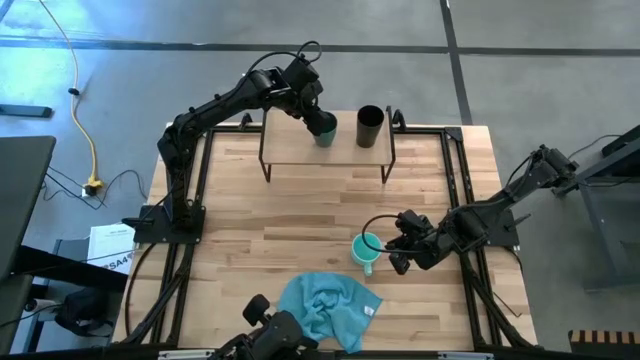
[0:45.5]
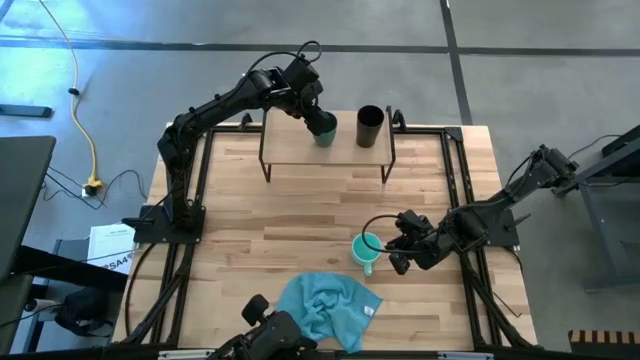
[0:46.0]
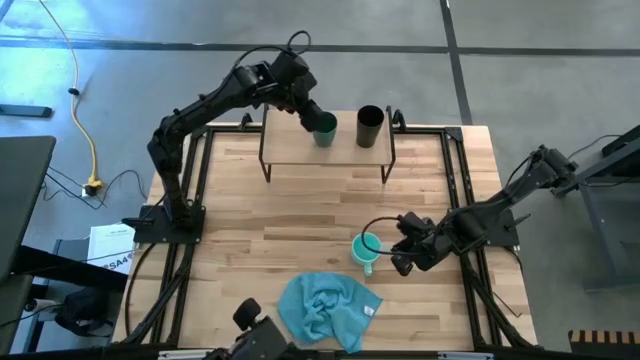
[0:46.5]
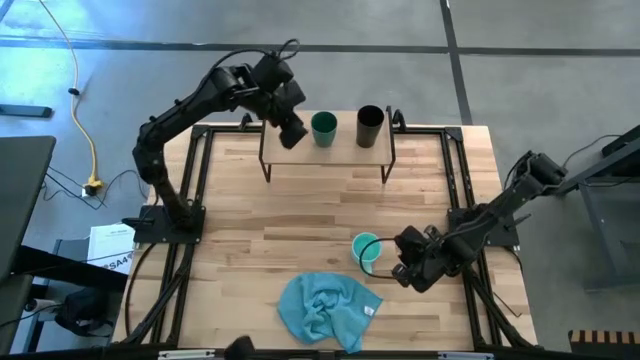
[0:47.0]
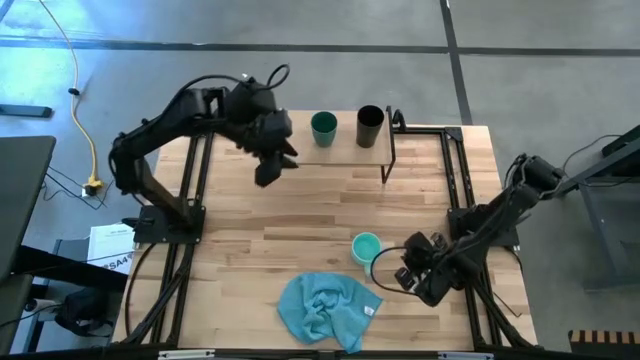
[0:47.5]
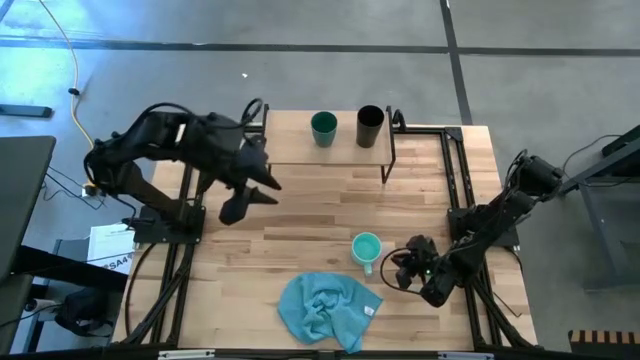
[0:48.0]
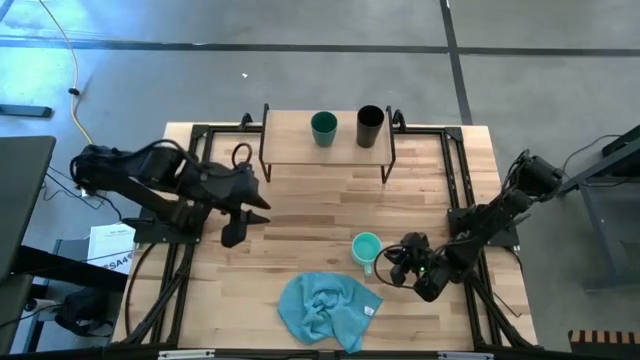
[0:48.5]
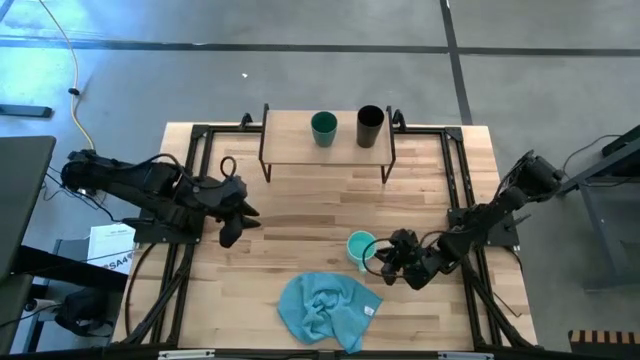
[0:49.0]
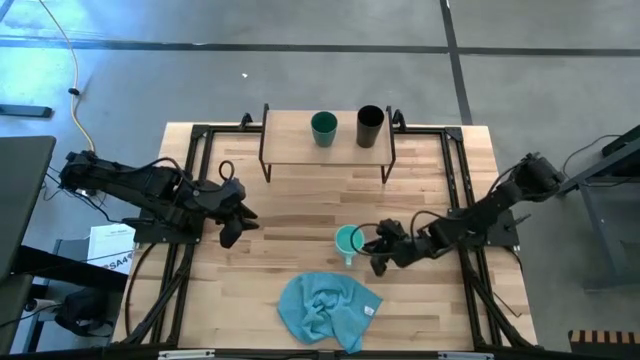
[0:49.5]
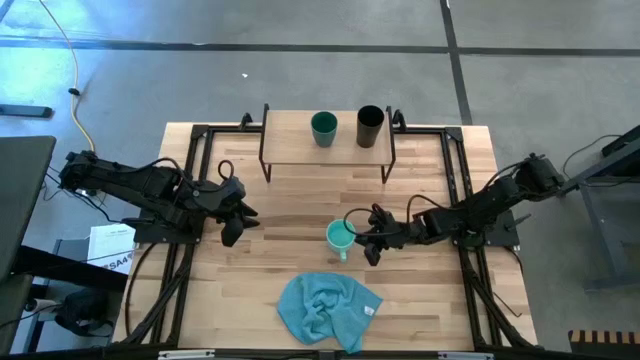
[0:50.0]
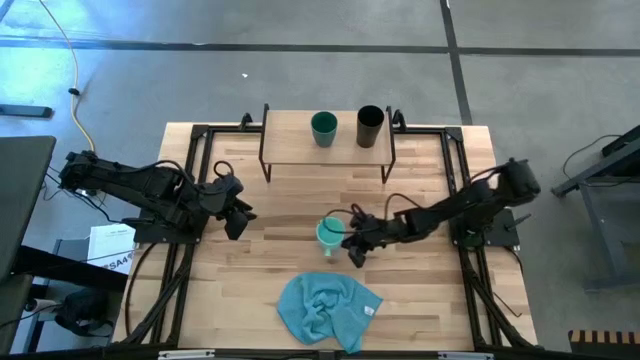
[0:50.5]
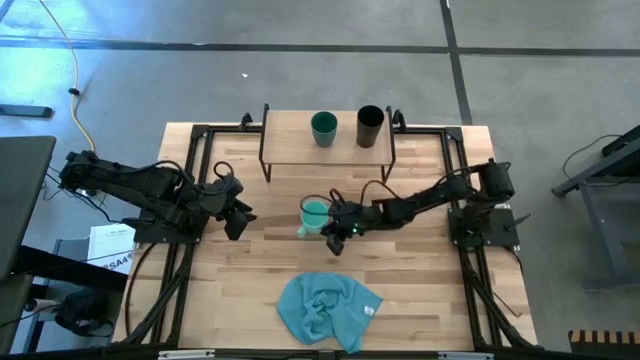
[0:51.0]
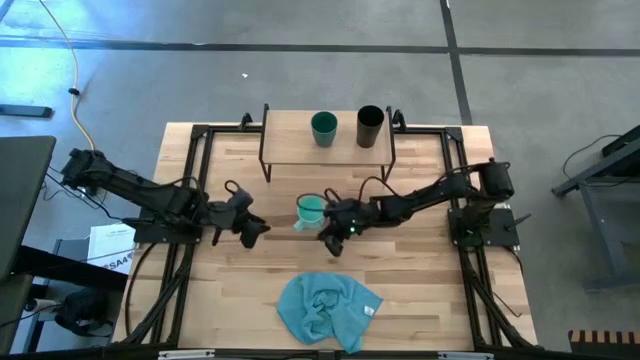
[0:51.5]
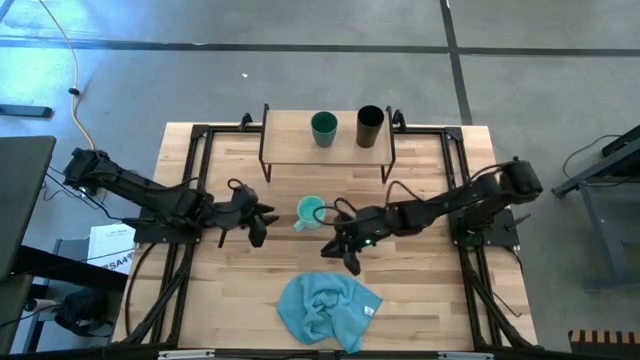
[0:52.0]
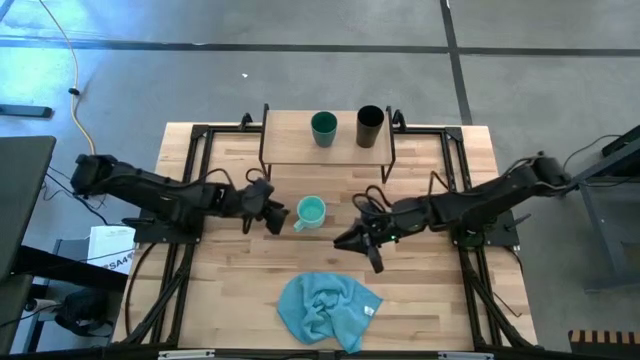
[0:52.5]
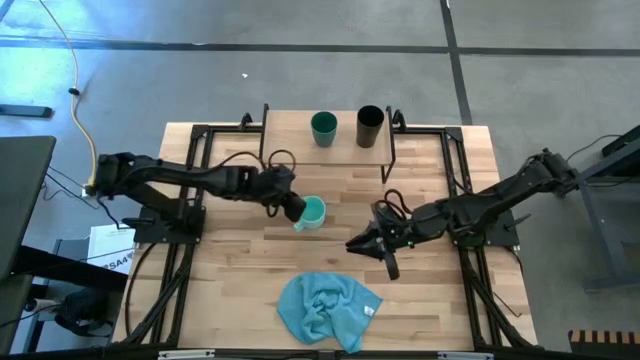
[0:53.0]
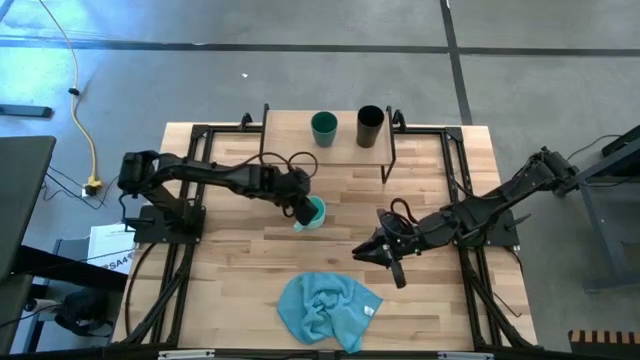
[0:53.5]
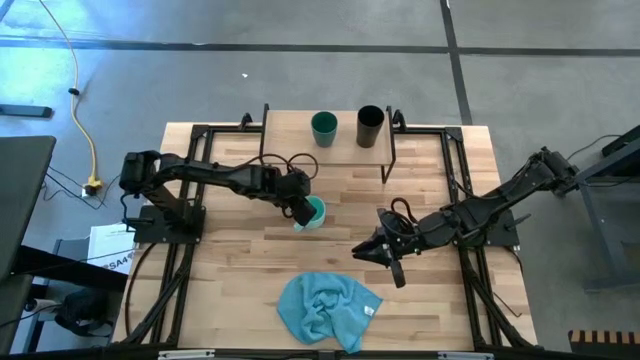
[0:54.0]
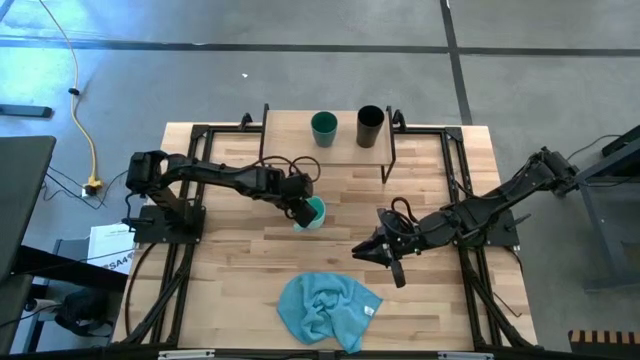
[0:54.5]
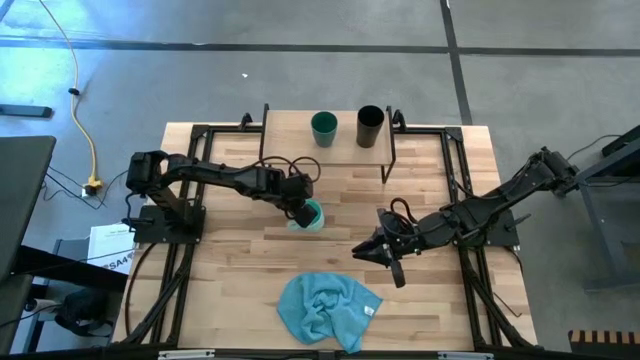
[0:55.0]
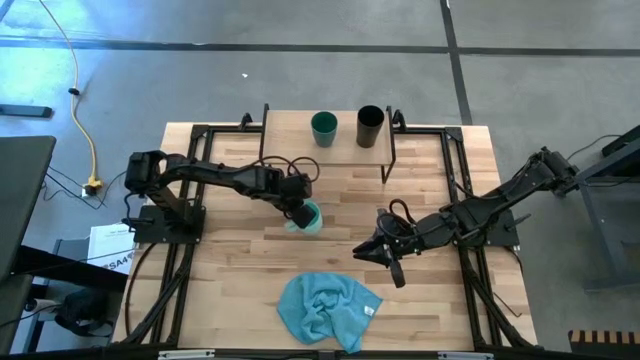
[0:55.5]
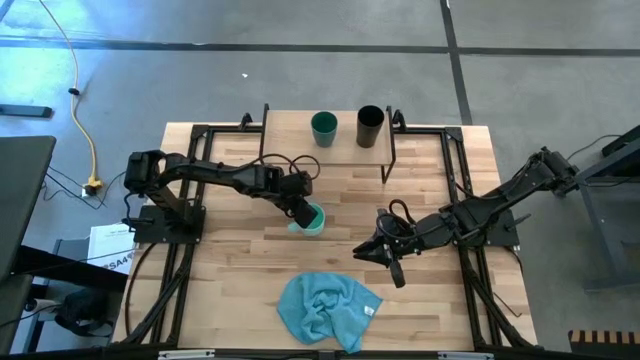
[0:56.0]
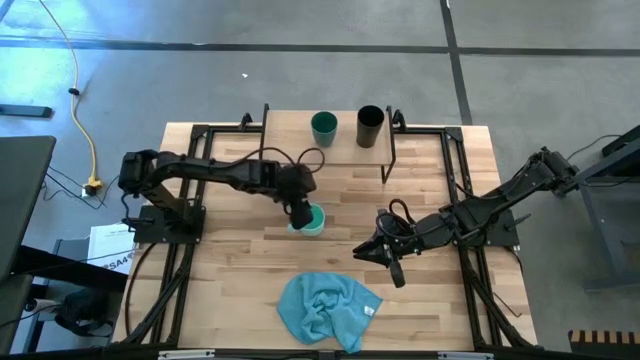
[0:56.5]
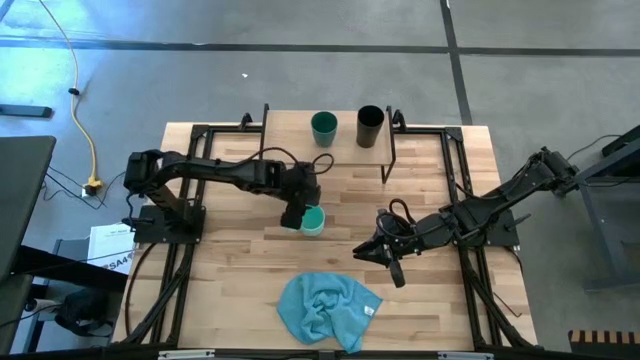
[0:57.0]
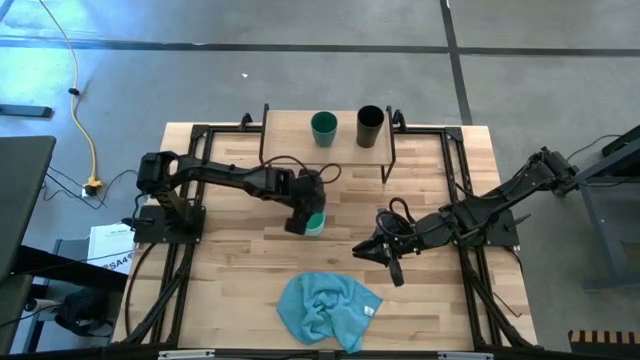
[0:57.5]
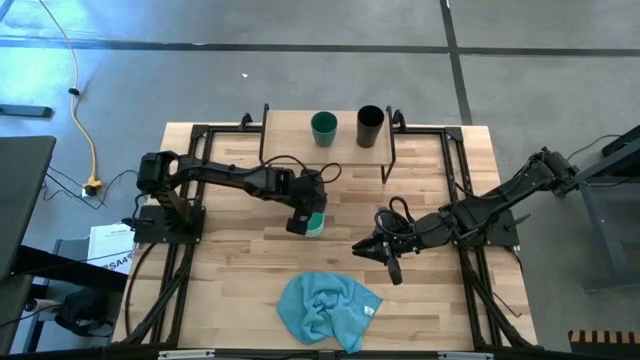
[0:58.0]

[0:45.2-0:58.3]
Task: Stack small to large cups/mugs on shelf
Put the blue mug on the shelf

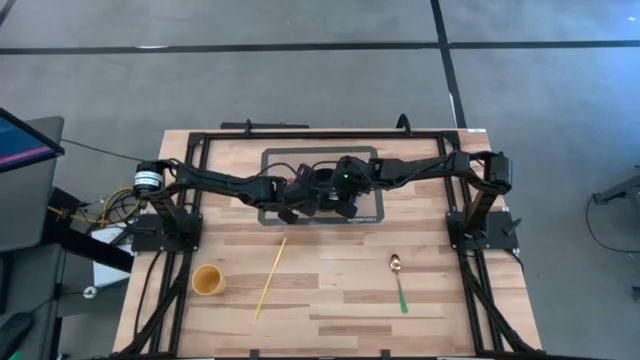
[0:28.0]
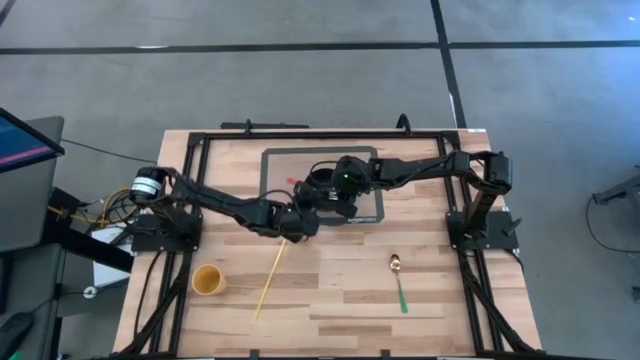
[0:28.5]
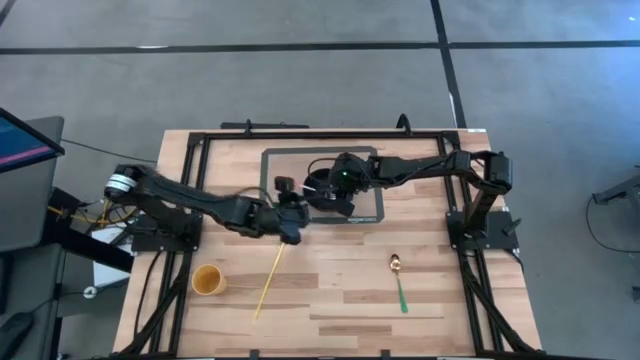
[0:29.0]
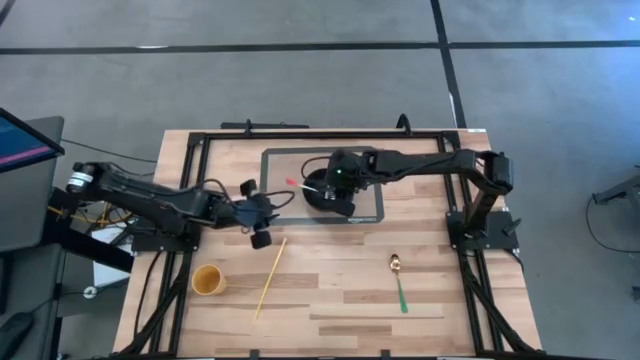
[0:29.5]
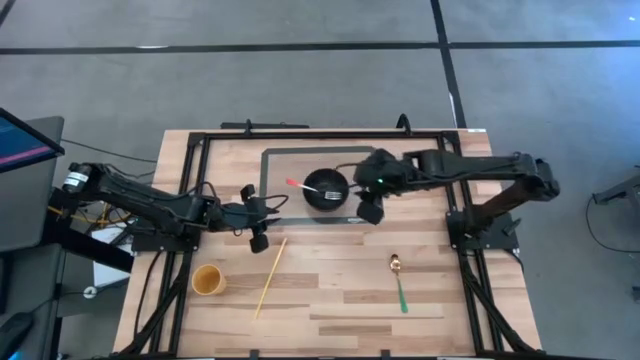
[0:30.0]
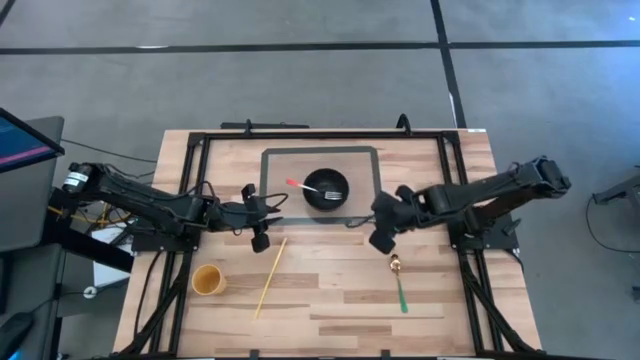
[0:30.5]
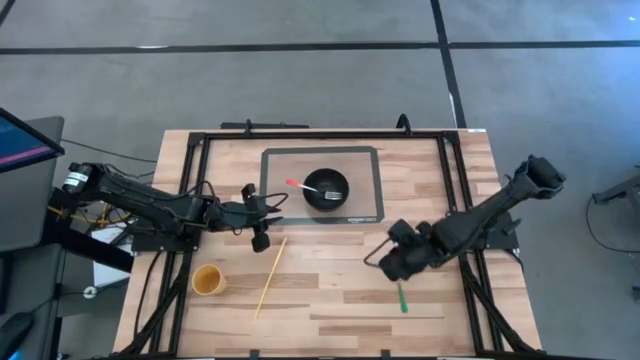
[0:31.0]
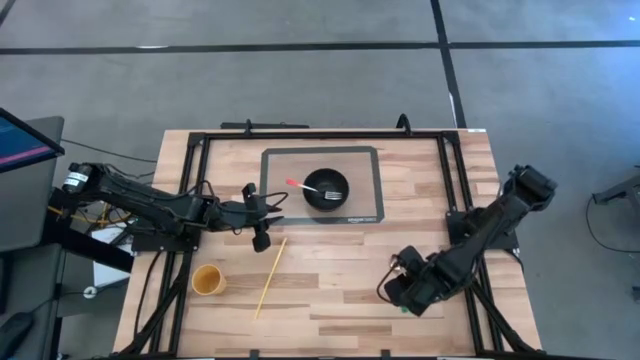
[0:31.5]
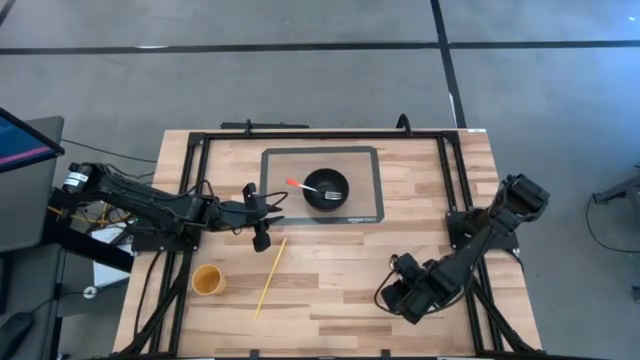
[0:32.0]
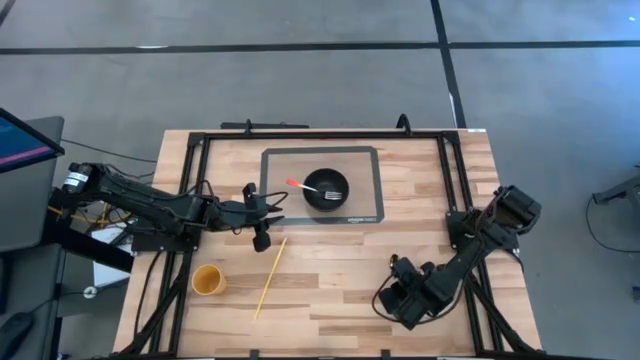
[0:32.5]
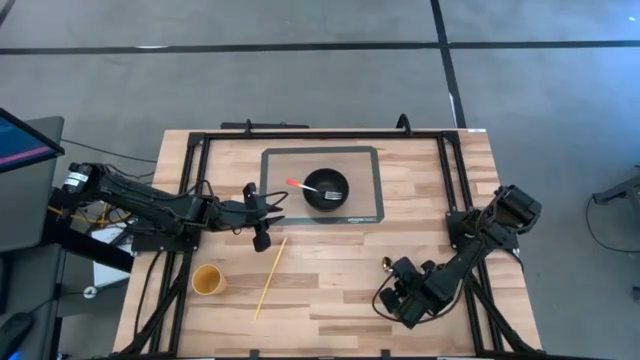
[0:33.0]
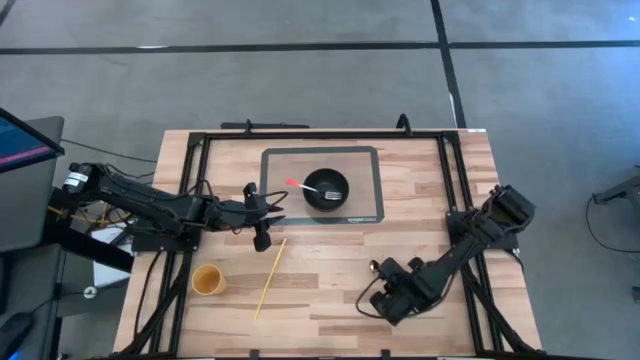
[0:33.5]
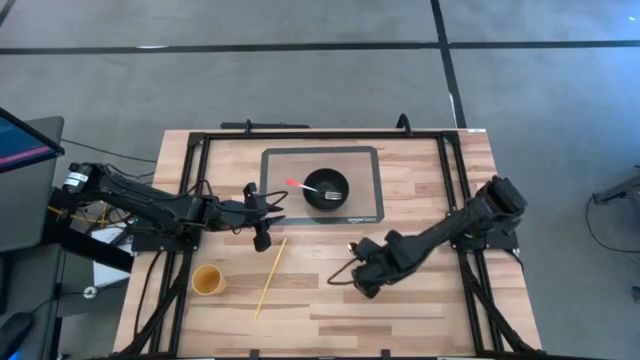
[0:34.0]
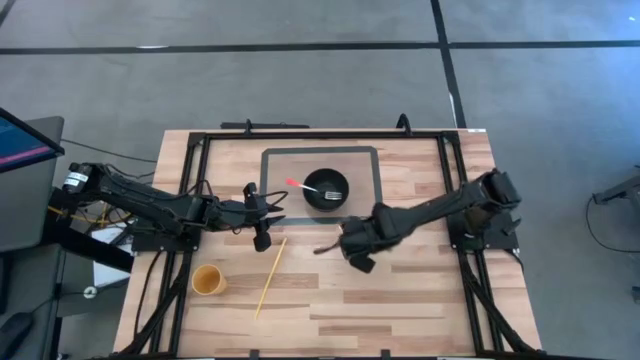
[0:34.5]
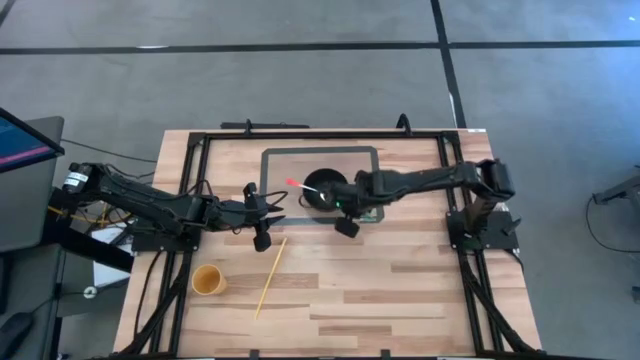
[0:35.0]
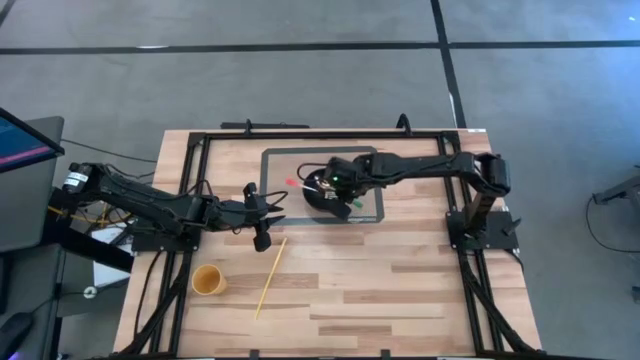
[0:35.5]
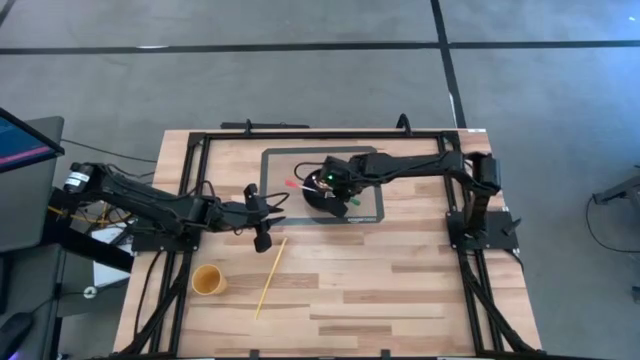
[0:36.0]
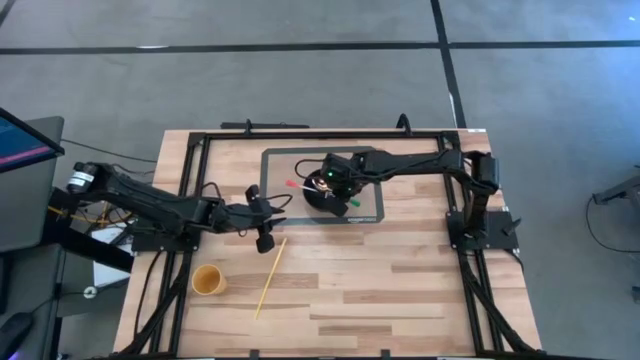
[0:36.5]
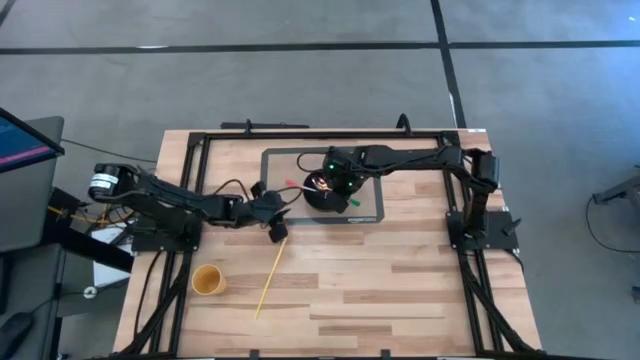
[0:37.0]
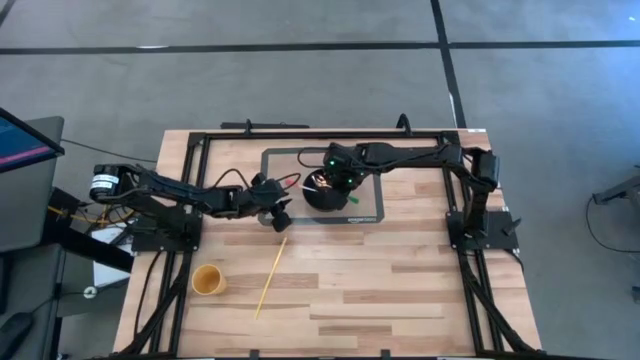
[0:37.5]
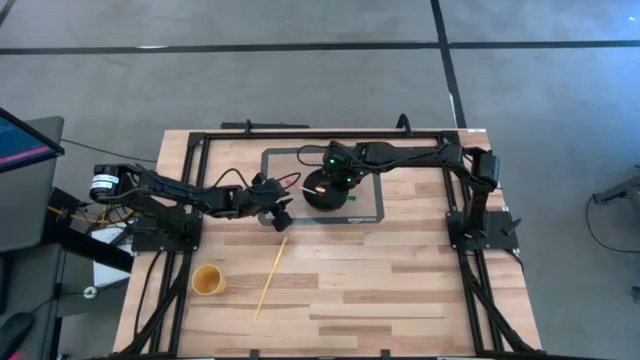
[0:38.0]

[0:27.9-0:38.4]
Task: Pick & Place Utensil
Put the green spoon into the black bowl
